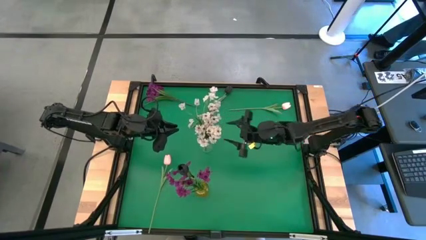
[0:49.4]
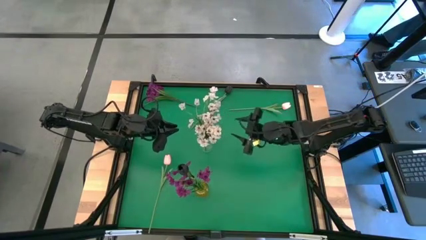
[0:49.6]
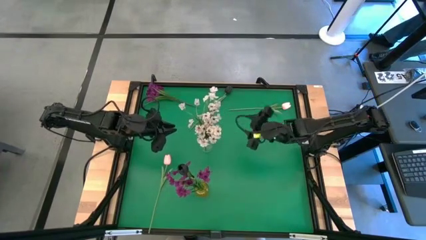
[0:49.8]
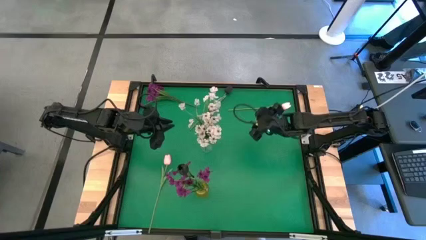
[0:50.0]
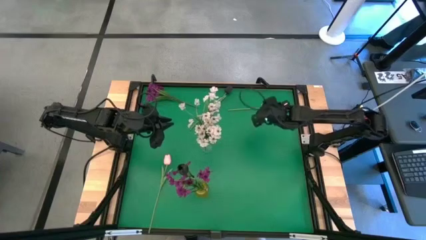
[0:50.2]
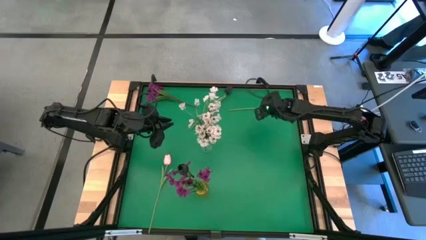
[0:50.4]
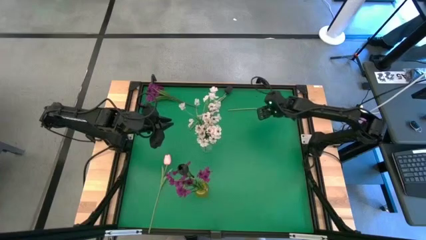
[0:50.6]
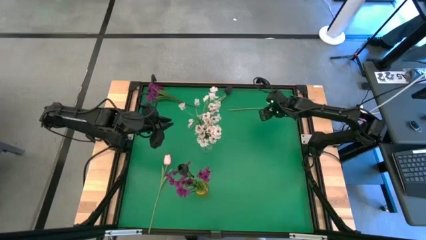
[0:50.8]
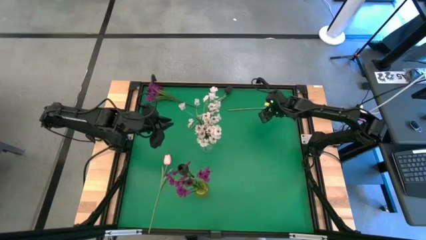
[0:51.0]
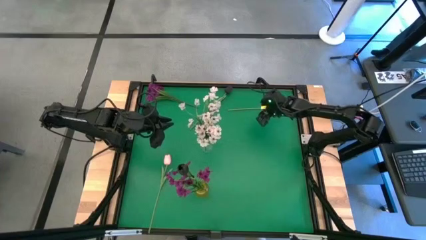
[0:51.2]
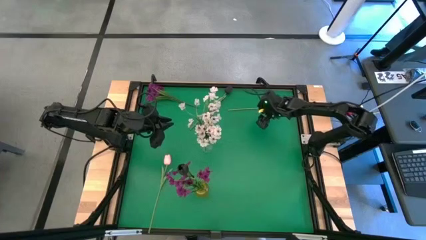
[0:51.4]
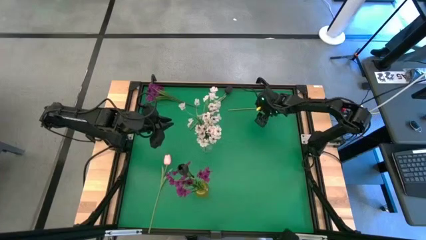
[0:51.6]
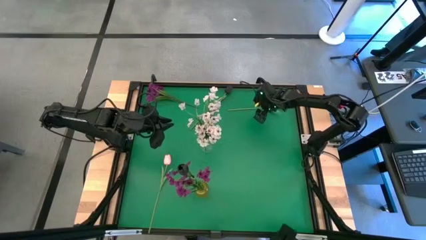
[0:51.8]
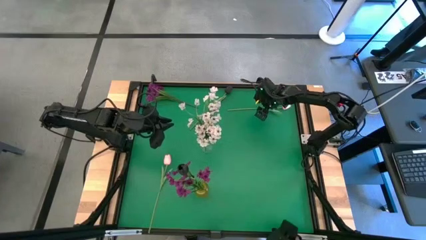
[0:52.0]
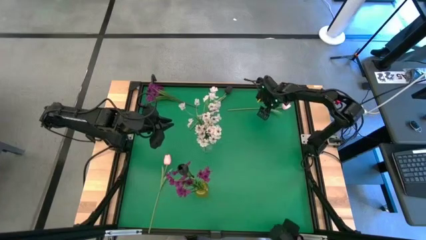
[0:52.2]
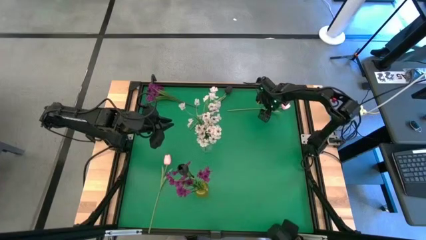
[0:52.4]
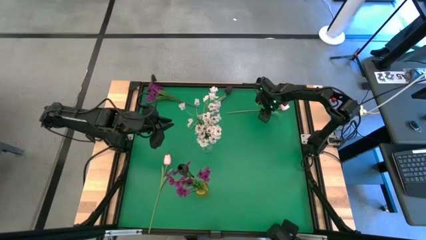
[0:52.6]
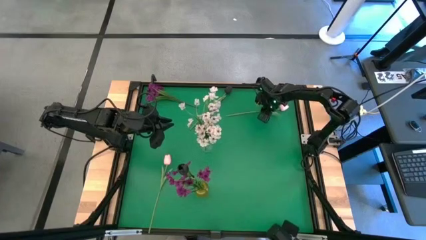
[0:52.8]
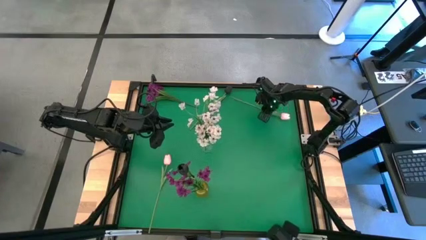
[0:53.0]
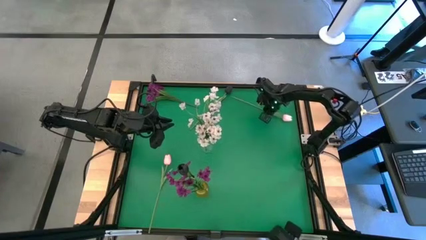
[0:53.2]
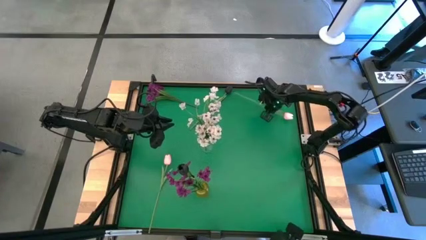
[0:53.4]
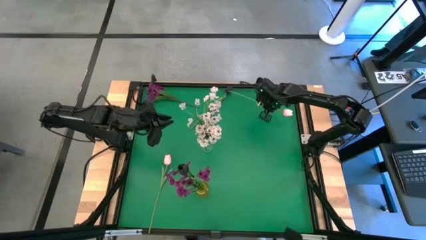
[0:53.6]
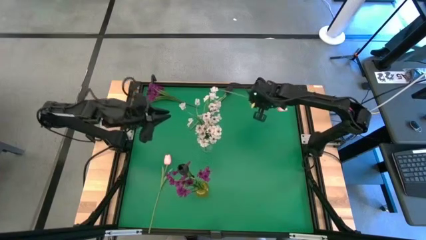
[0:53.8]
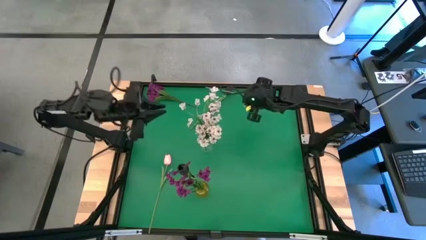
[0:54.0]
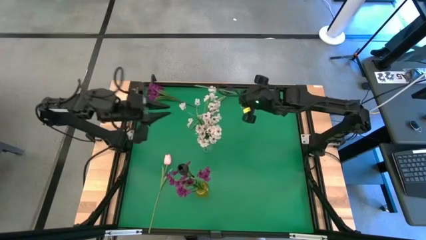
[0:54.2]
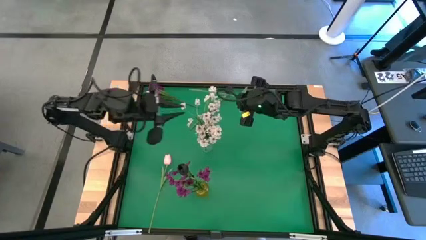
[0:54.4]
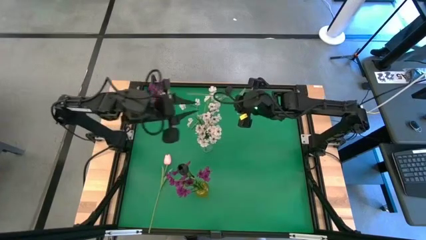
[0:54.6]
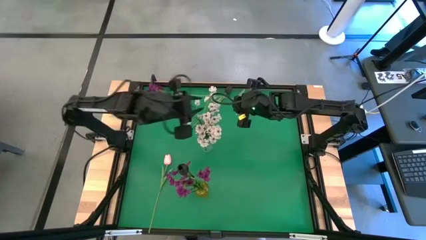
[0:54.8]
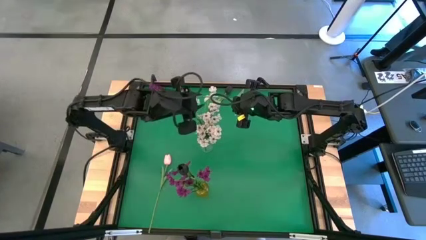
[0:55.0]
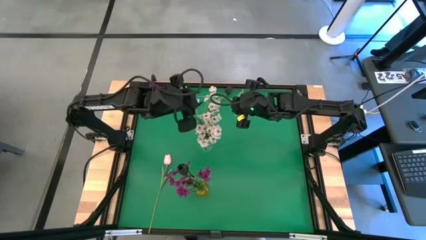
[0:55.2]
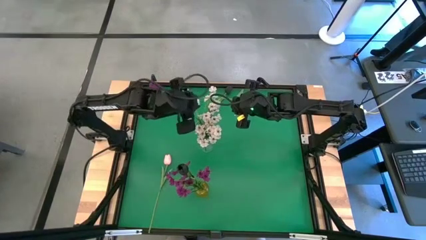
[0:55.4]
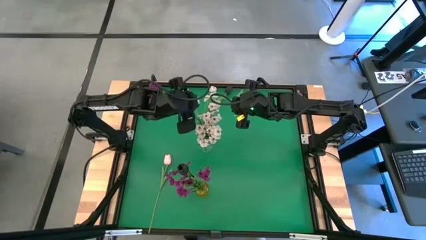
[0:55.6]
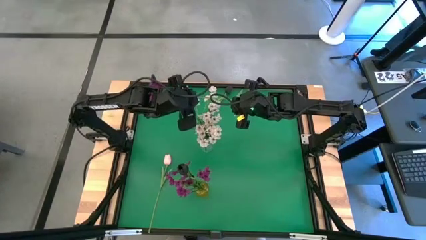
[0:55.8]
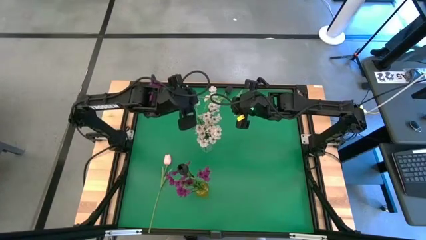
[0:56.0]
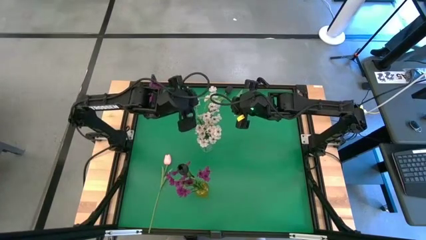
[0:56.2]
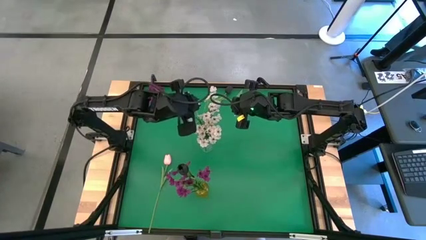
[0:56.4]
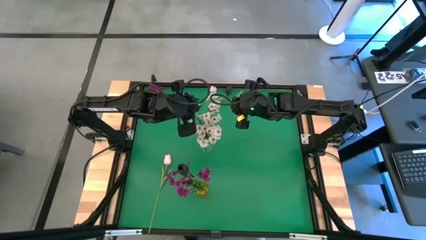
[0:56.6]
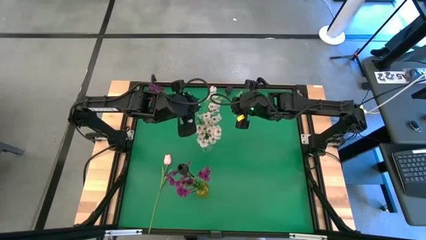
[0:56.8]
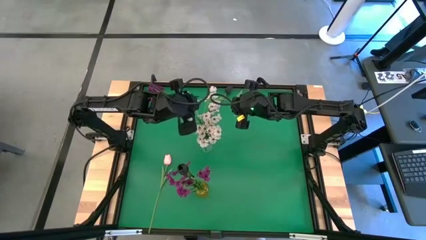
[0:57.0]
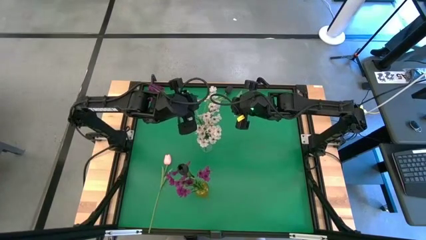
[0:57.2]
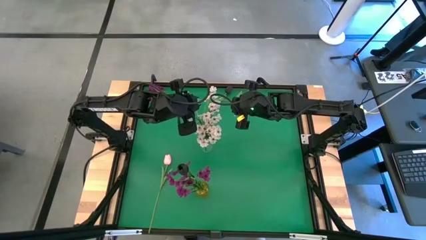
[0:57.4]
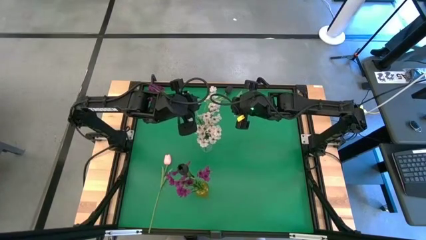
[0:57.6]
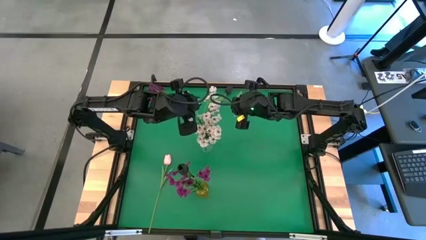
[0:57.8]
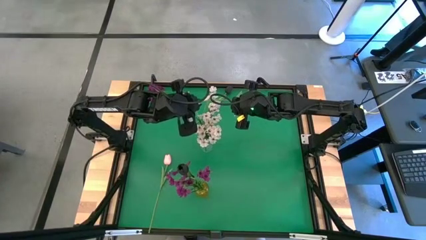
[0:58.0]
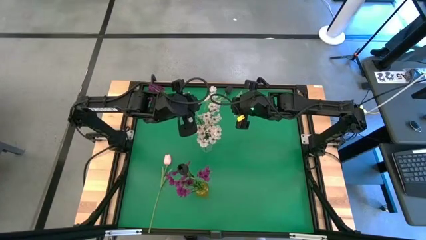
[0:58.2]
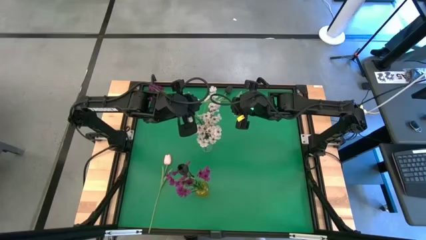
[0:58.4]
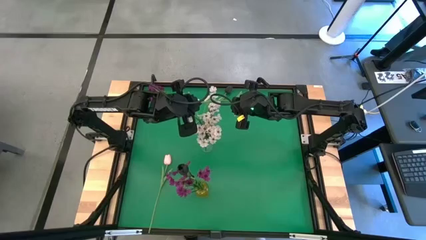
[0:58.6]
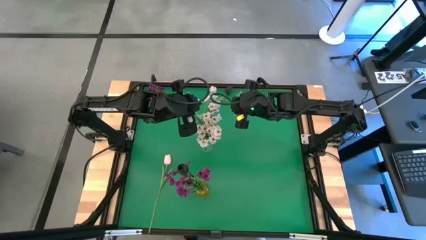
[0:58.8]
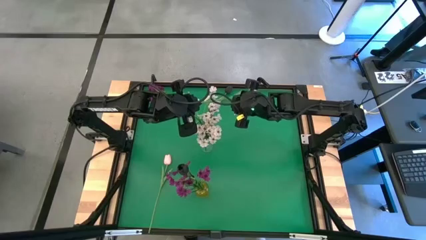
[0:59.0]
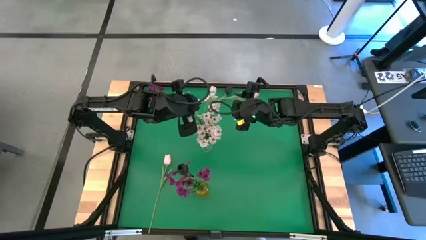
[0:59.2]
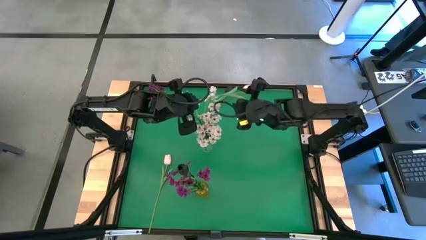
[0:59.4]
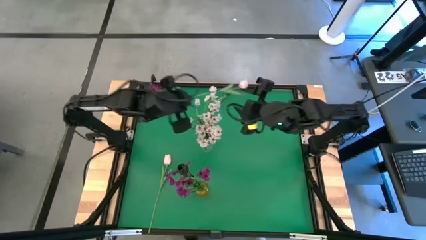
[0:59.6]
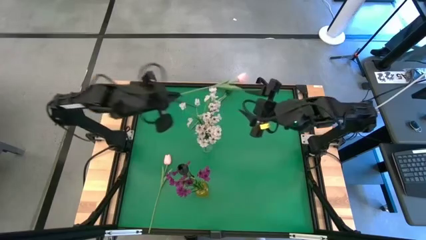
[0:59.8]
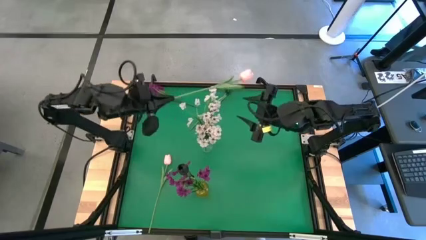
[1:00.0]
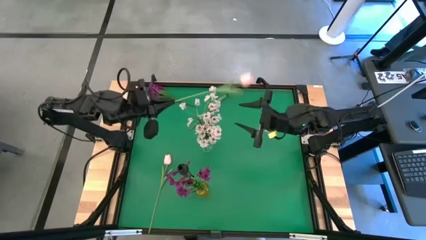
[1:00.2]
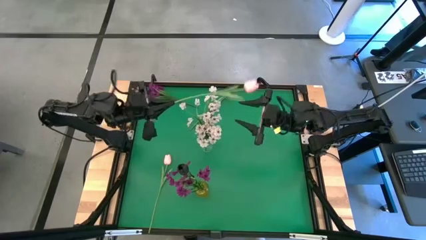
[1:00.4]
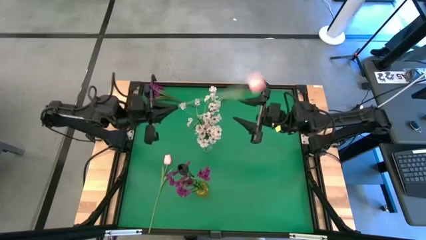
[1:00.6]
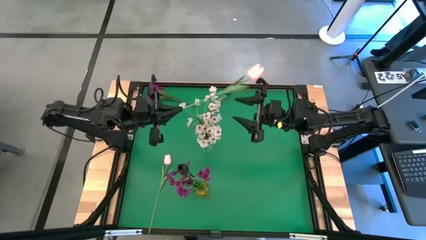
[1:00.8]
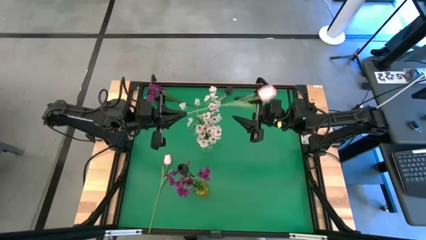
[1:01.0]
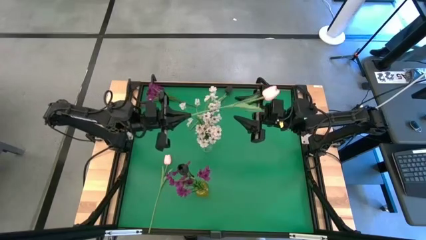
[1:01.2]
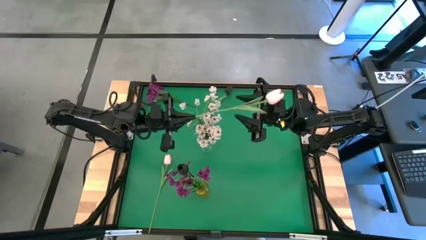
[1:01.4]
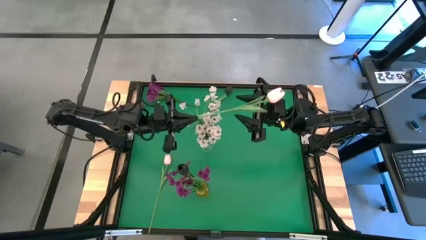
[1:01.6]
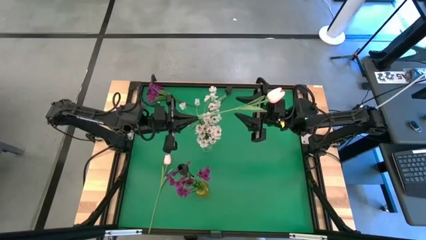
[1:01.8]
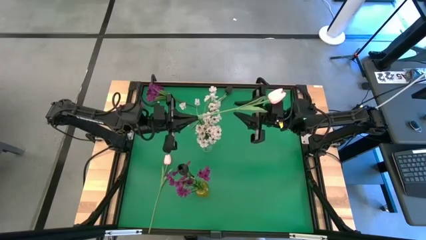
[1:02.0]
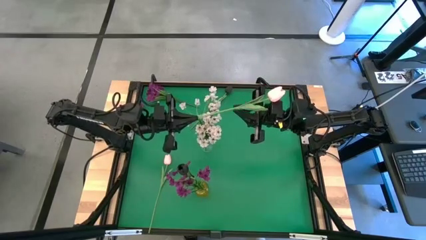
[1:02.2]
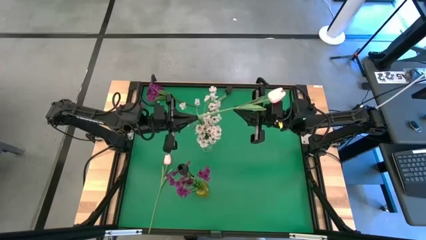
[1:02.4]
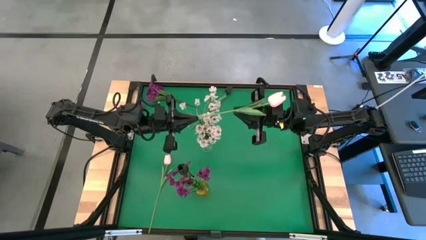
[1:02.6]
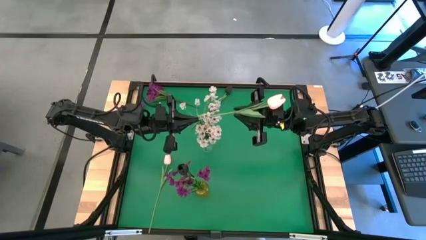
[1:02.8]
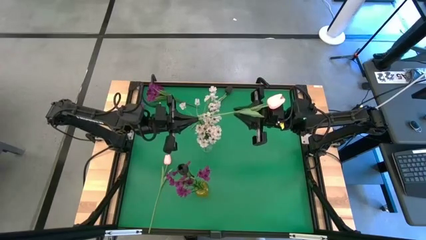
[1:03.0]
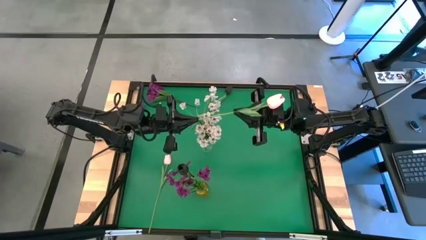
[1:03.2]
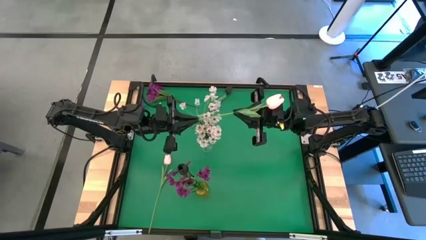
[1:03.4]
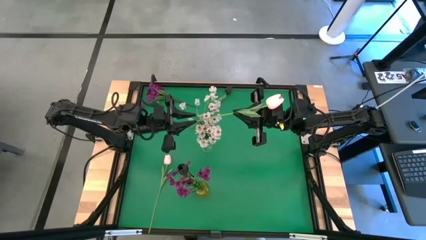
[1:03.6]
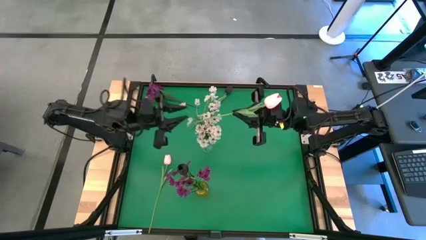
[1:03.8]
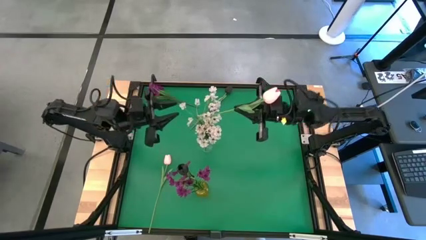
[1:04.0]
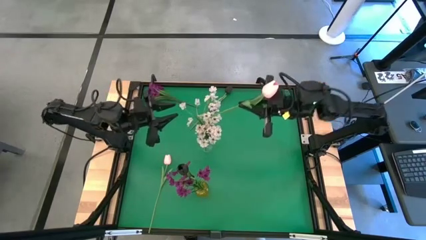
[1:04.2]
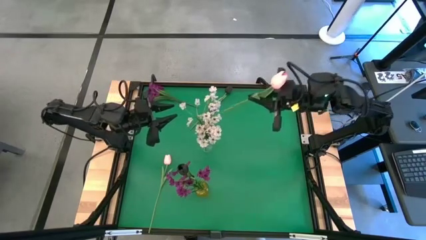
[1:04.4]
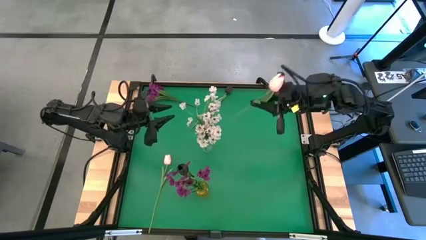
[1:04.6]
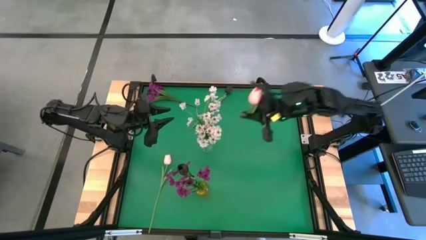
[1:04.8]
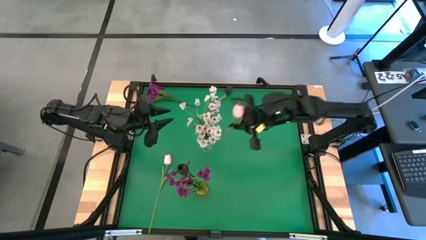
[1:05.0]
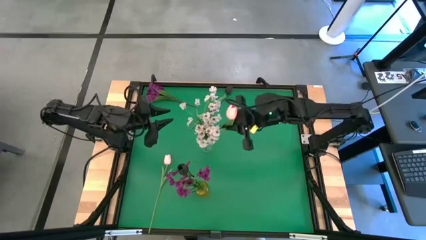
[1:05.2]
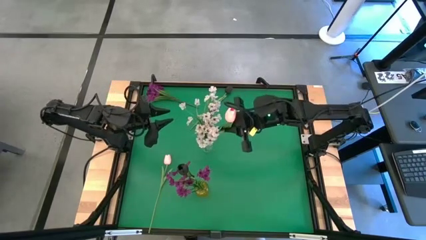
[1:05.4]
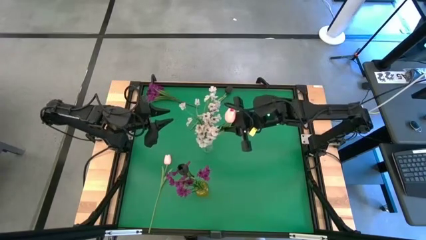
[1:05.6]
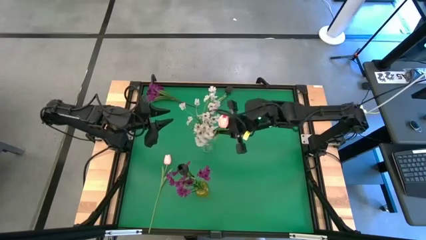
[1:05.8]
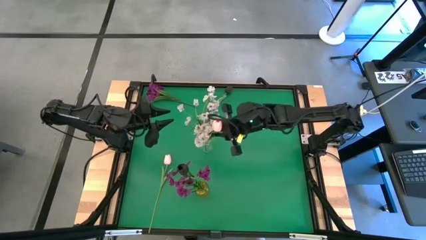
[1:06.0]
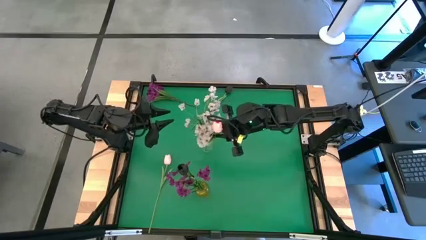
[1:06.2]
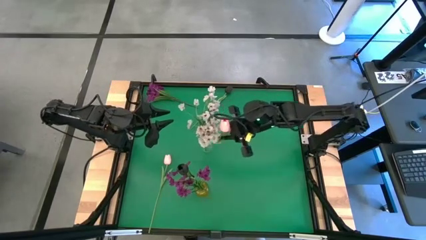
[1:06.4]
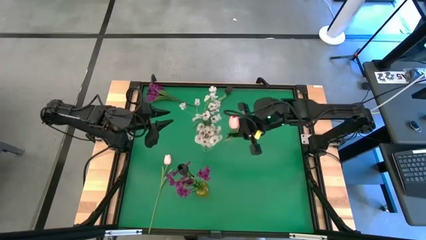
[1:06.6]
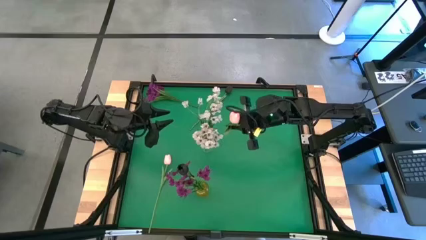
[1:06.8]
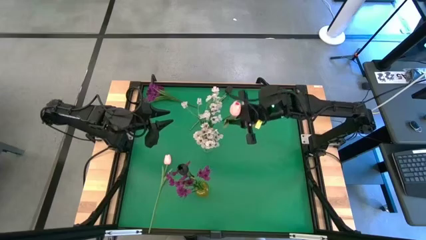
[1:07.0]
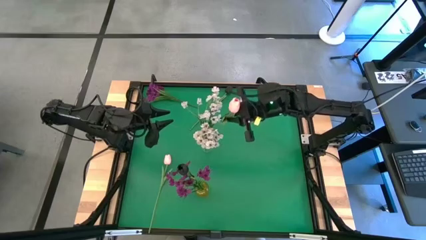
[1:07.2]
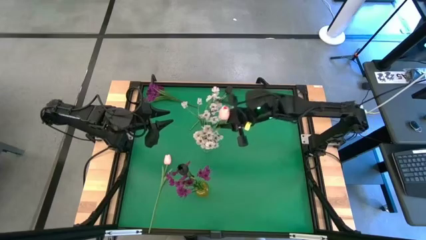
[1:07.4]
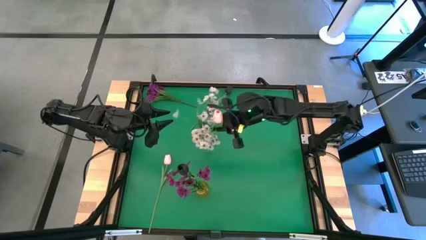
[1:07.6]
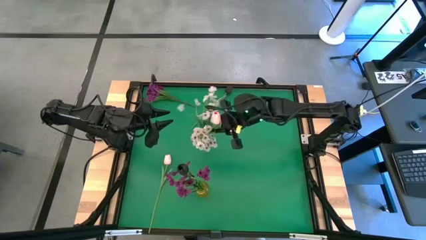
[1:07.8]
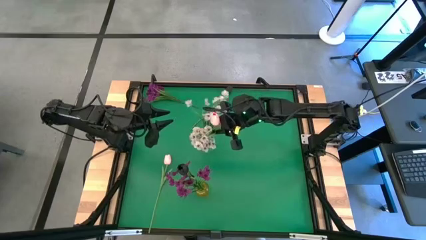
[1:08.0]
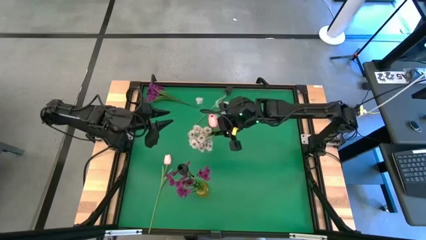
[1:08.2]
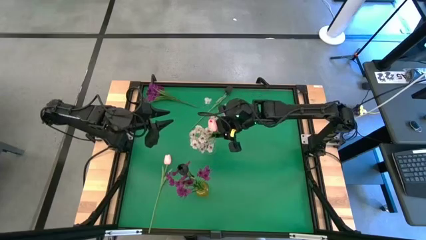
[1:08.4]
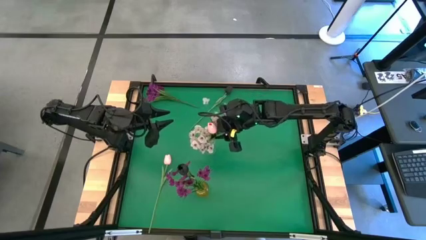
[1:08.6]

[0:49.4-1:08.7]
Task: Sort flowers into vase by color
Put the top pink flower into the transparent vase
